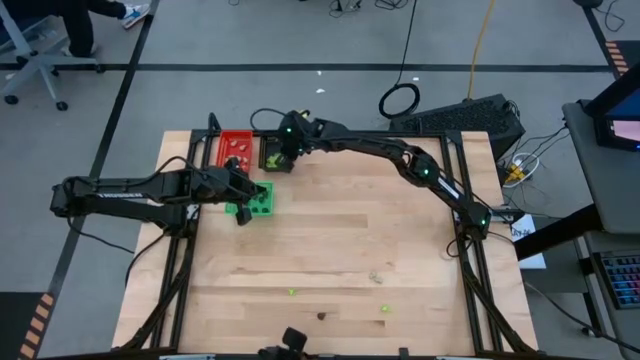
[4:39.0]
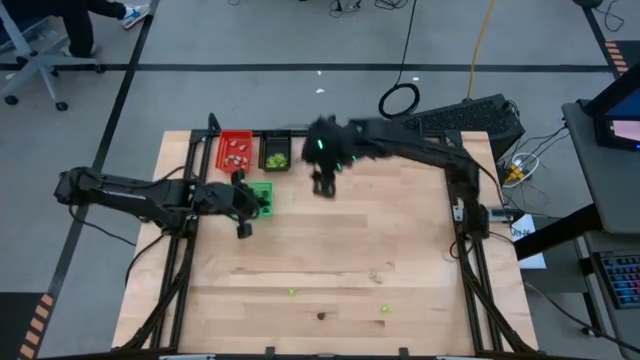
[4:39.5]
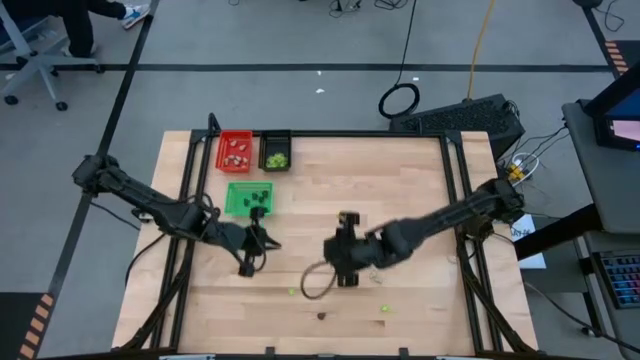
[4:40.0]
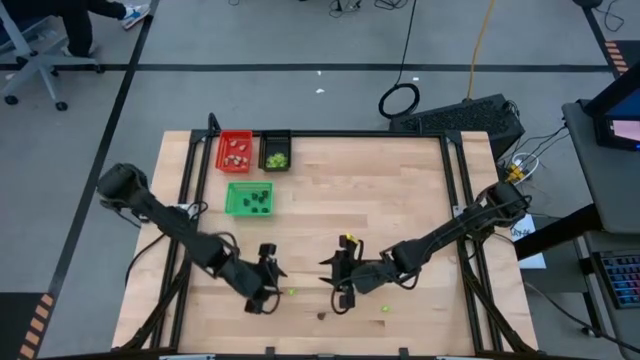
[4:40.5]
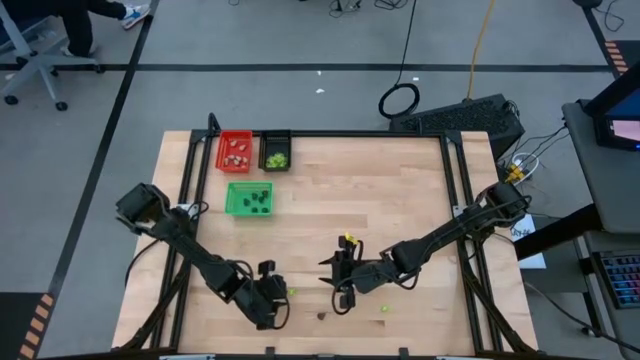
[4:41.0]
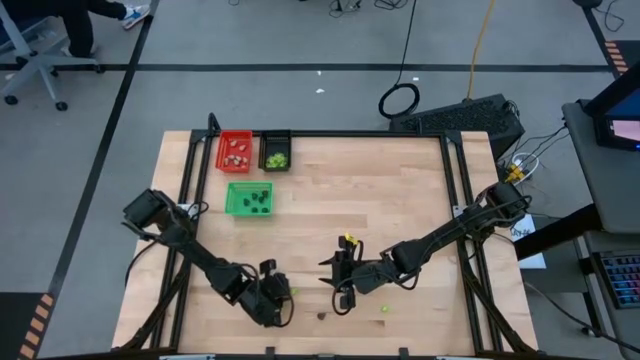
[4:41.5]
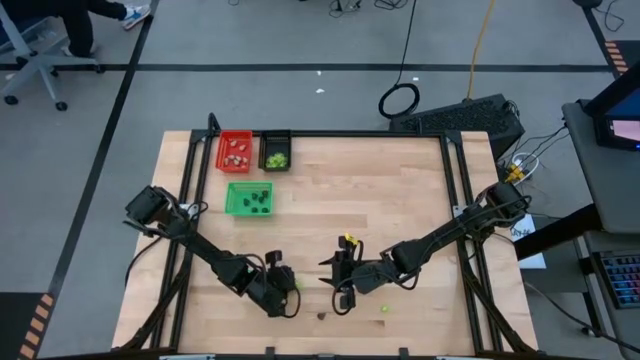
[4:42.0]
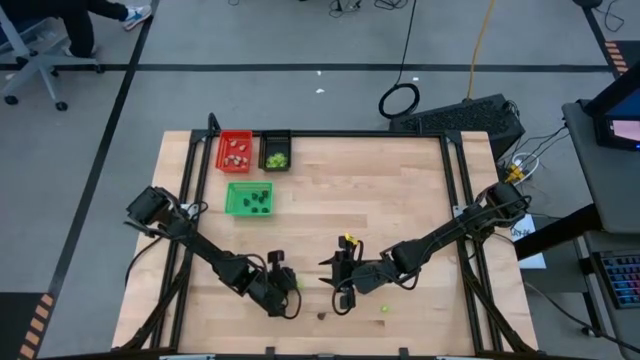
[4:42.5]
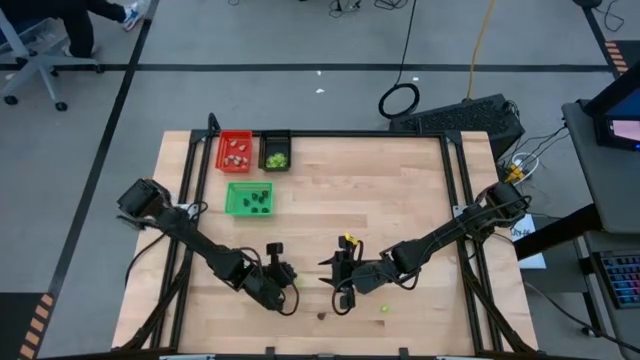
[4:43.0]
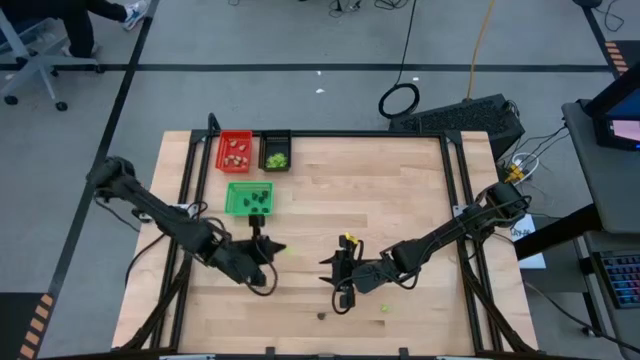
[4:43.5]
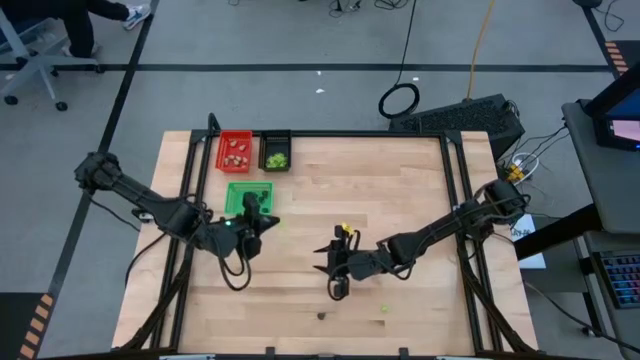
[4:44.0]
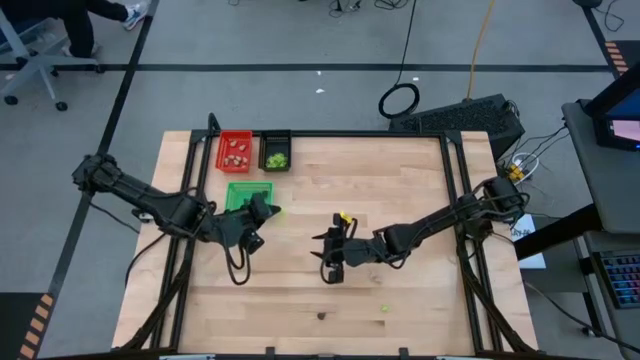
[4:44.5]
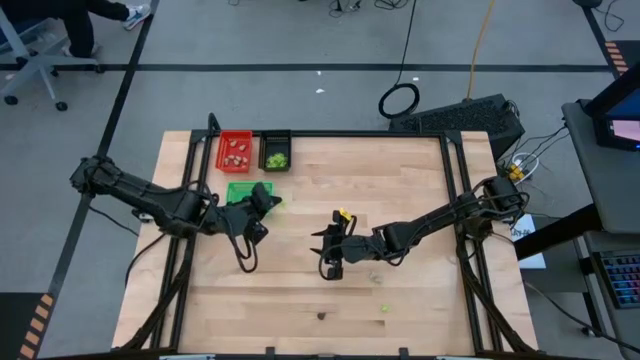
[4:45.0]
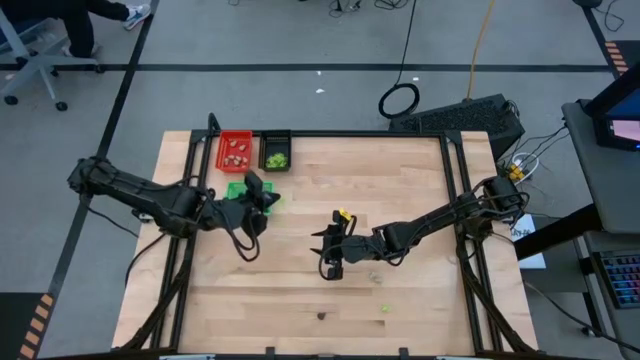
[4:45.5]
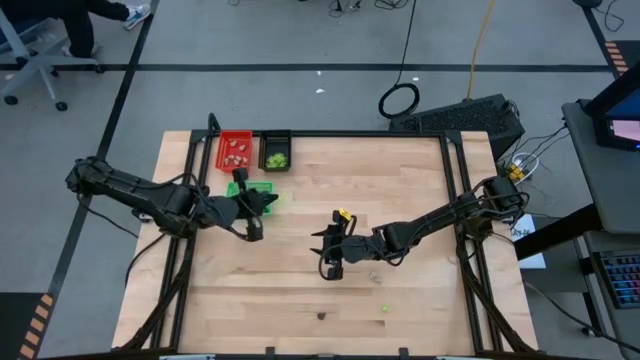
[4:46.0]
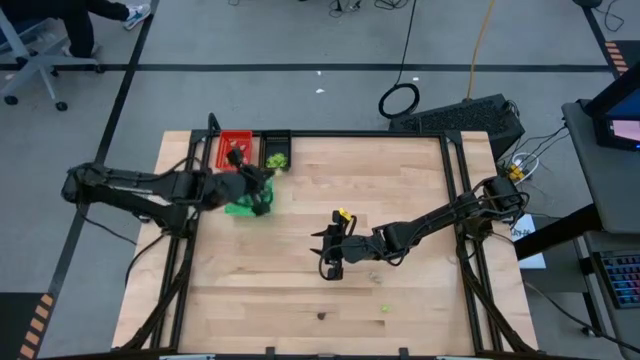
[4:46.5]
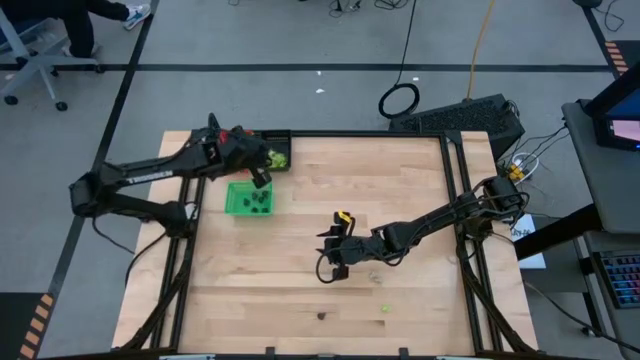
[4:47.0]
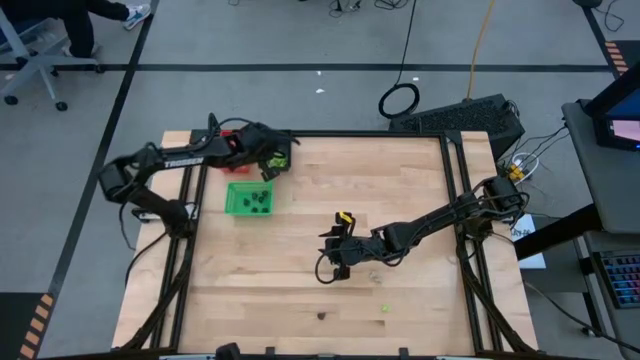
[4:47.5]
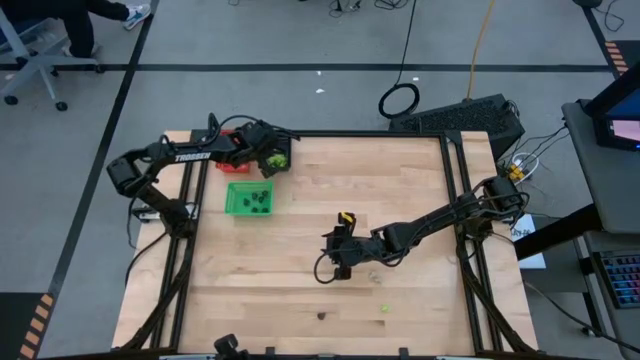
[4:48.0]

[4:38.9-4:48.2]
Task: Sort Halloween decoration
Put the green spider toy into the black bin

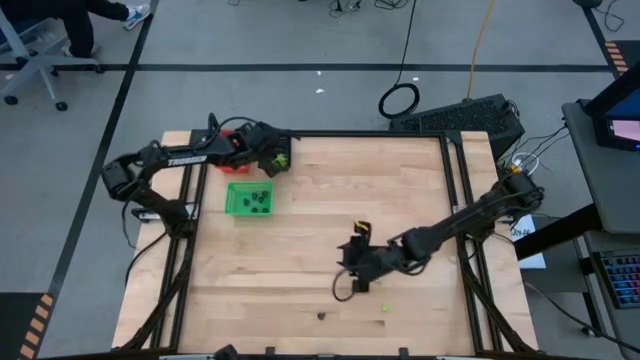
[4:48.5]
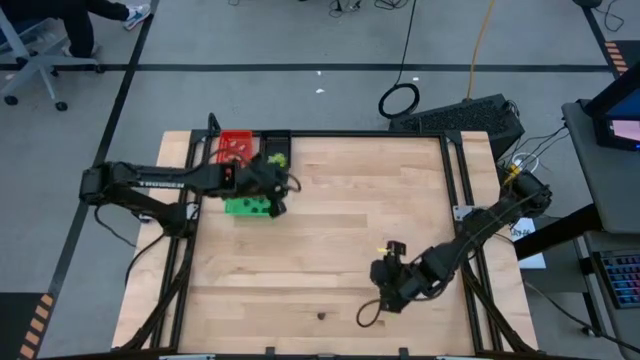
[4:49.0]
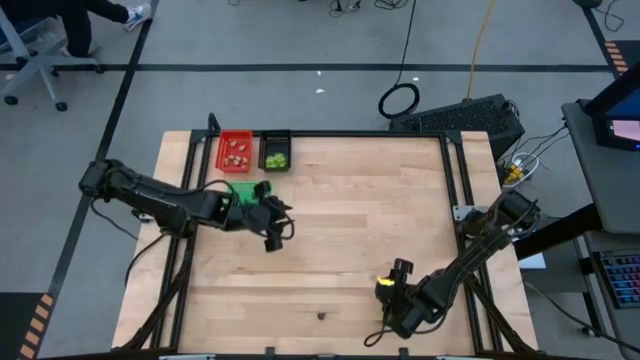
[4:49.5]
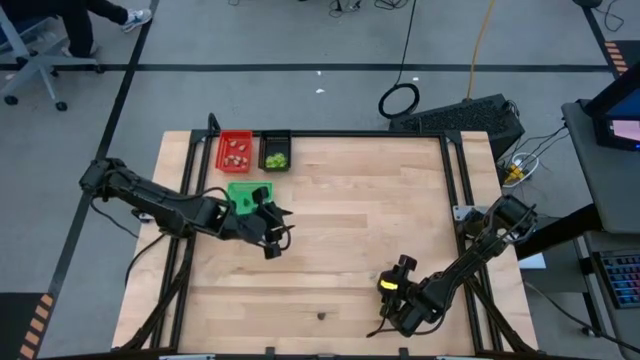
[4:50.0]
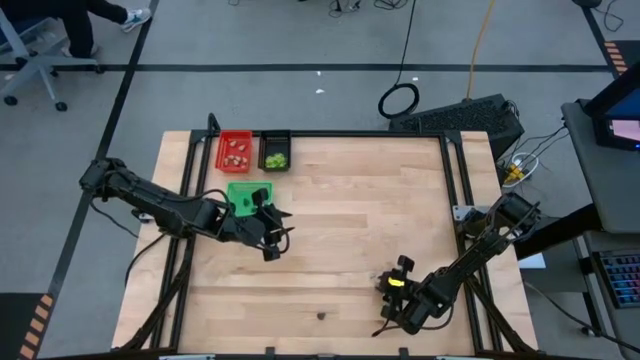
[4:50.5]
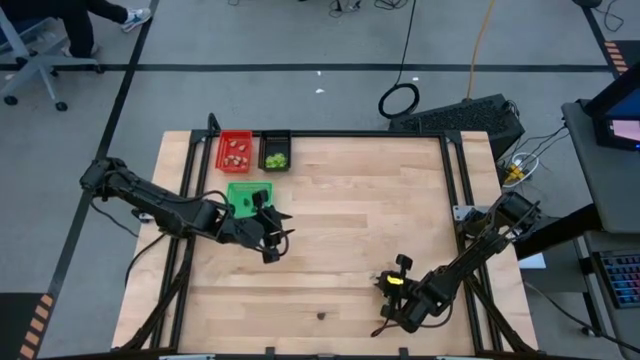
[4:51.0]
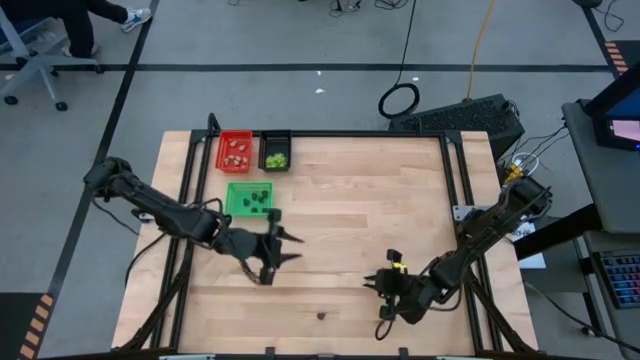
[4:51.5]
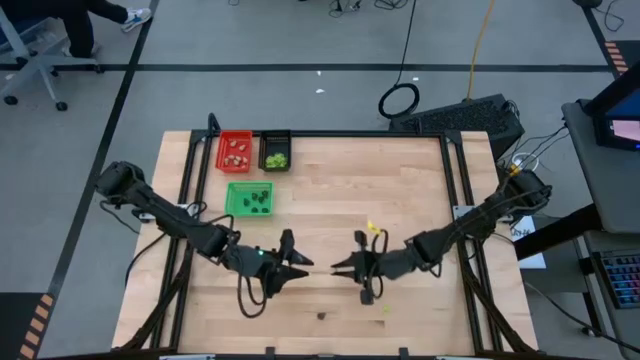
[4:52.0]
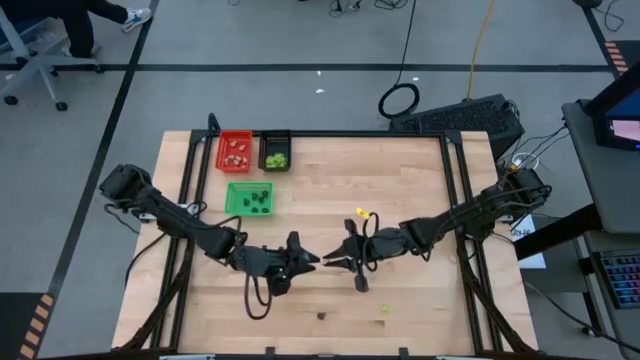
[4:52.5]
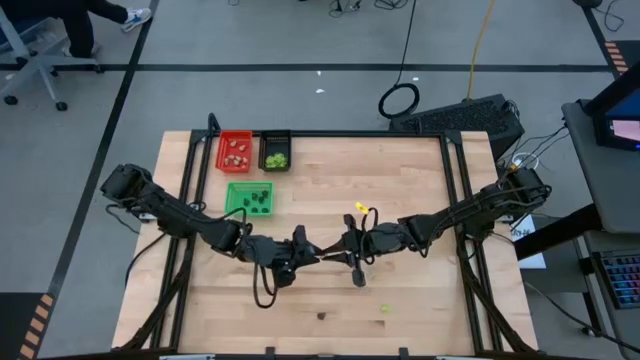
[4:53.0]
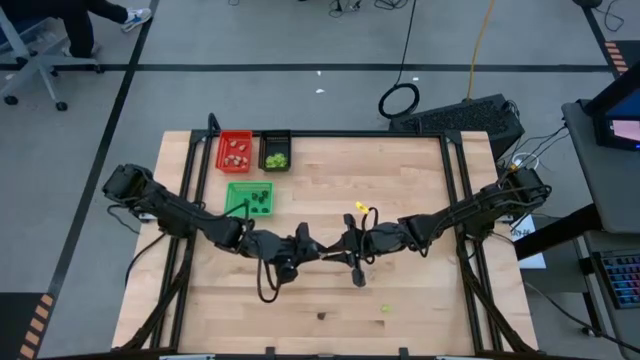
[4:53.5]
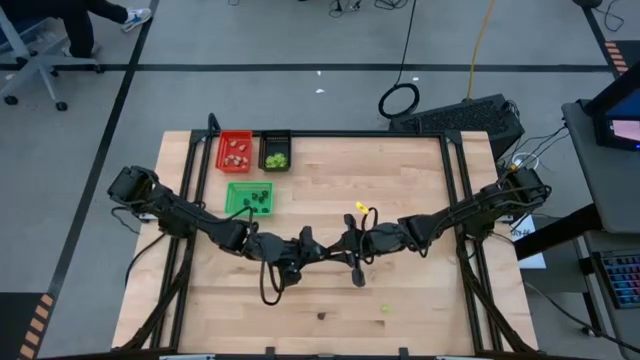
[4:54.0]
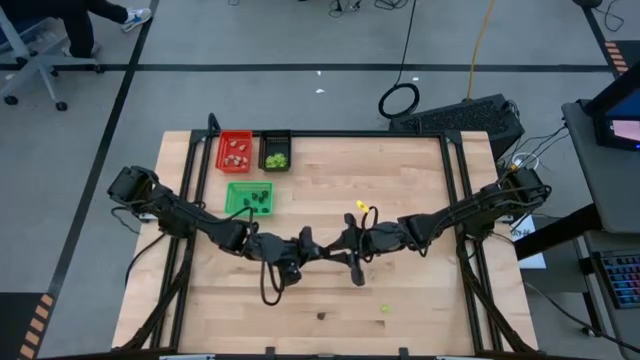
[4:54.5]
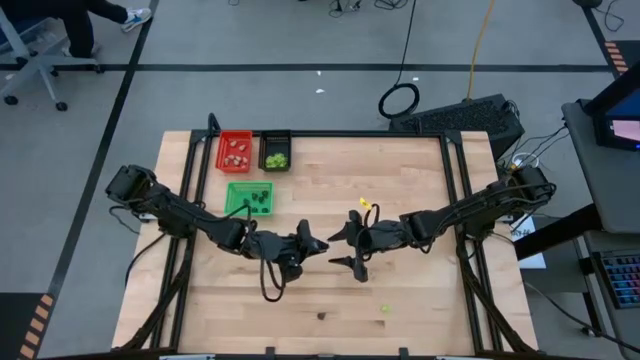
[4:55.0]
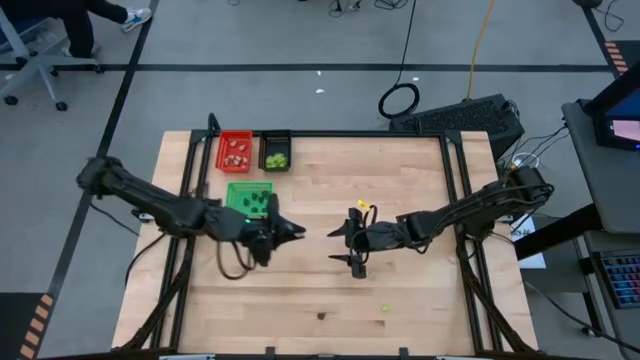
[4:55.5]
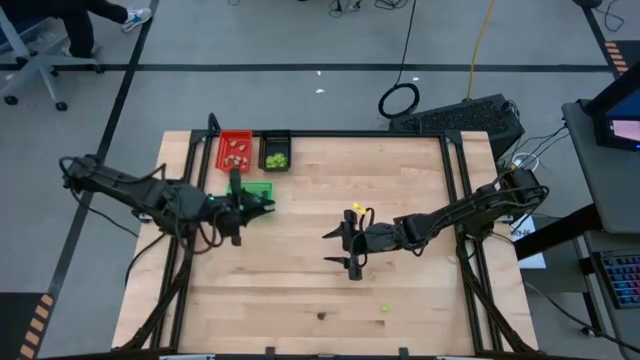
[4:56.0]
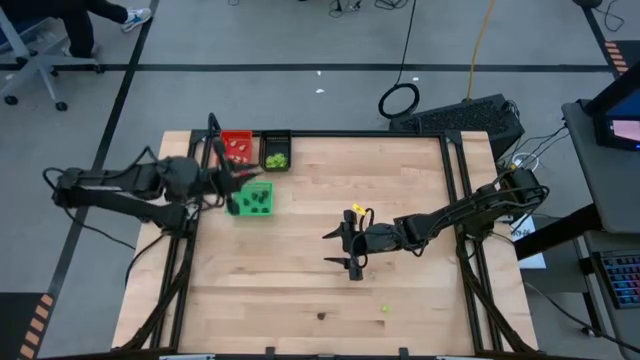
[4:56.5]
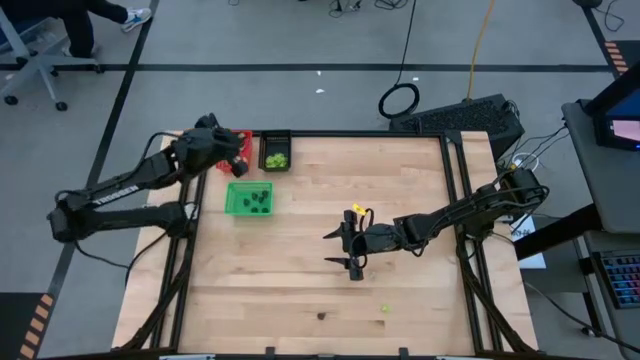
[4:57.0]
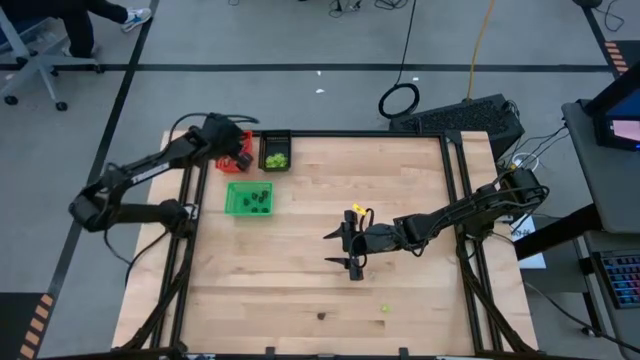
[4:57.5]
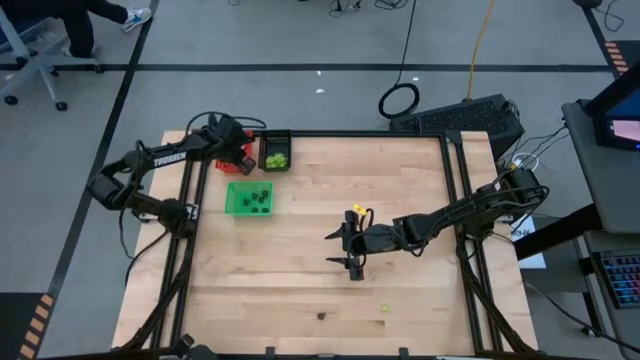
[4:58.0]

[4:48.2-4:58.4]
Put the white skull toy into the red bin

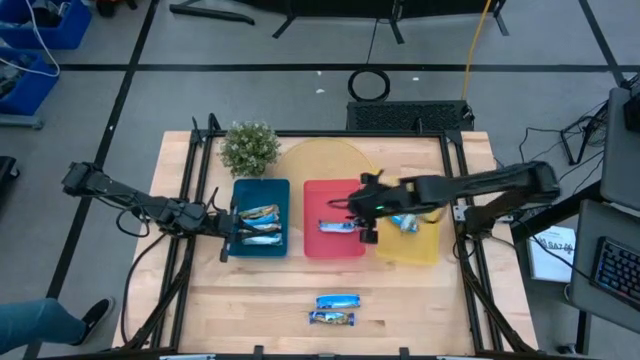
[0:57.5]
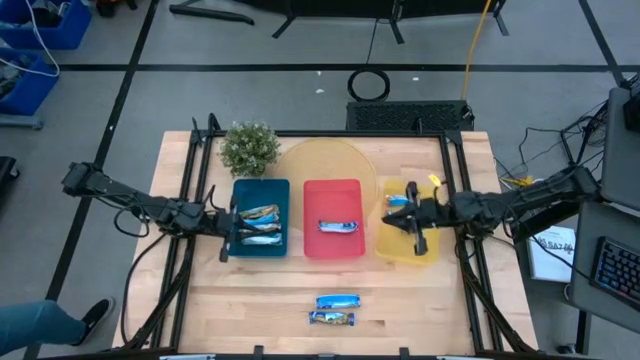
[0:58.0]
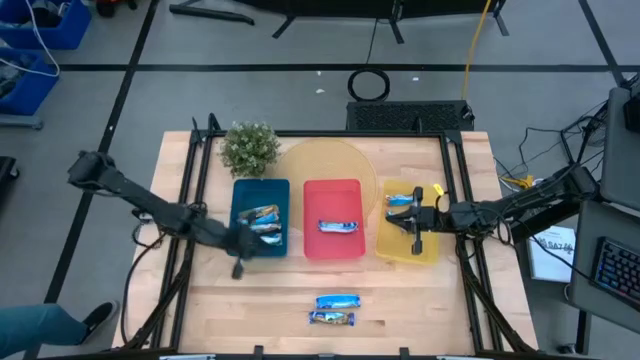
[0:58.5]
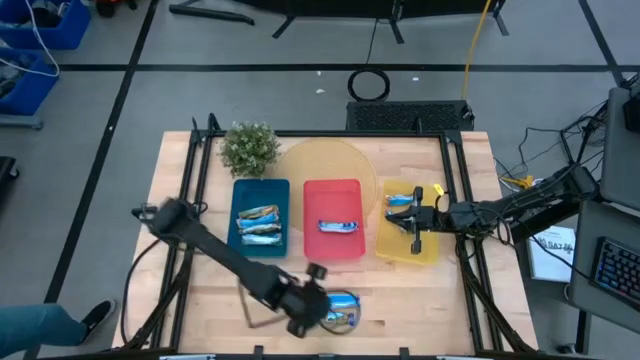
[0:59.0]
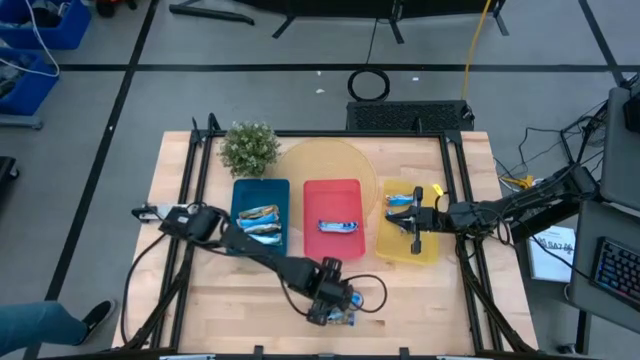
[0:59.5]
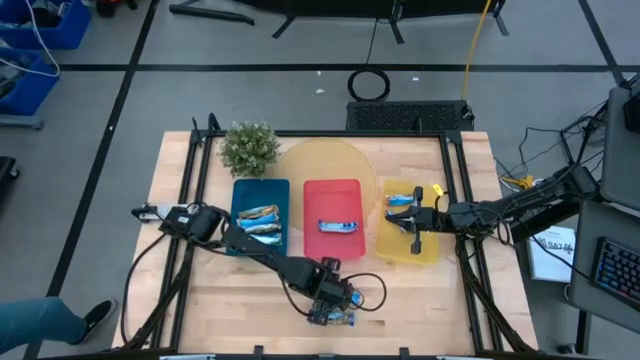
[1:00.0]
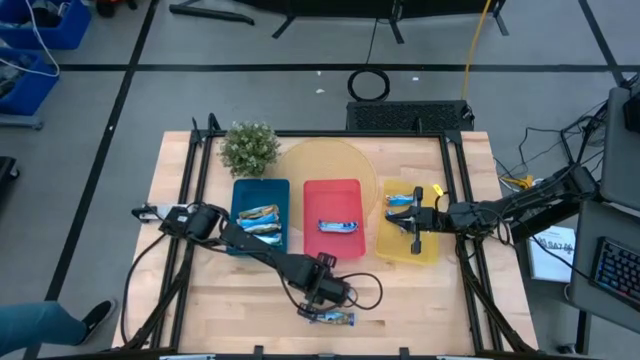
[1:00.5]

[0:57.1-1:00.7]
Task: Pick and place Granola Bars by type
Put the blue granola bar into the red bin
